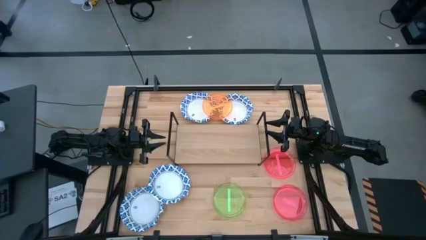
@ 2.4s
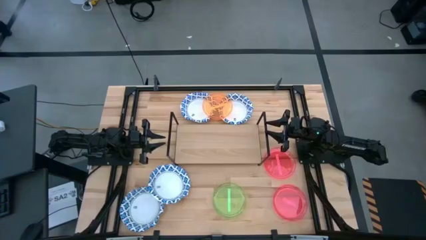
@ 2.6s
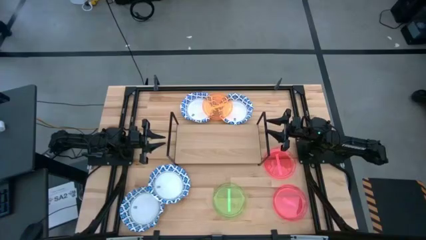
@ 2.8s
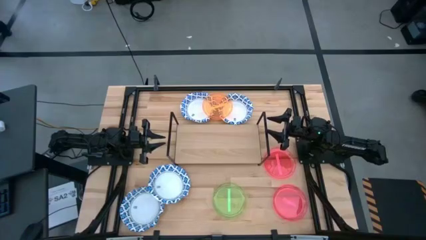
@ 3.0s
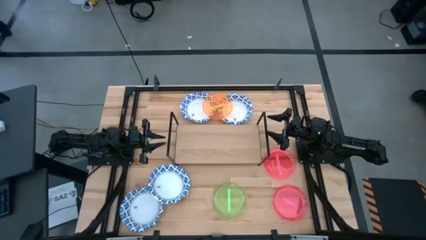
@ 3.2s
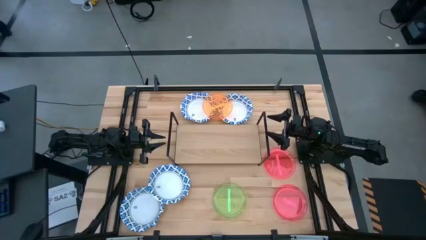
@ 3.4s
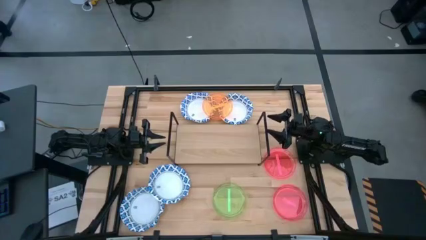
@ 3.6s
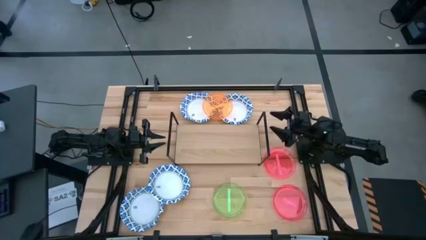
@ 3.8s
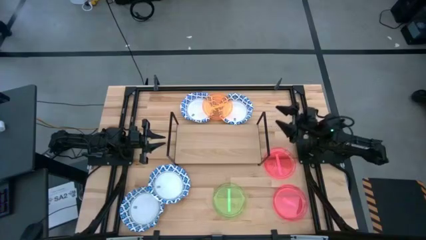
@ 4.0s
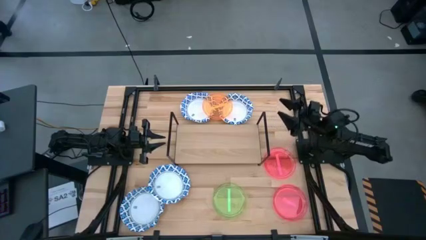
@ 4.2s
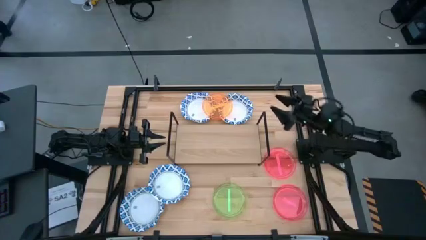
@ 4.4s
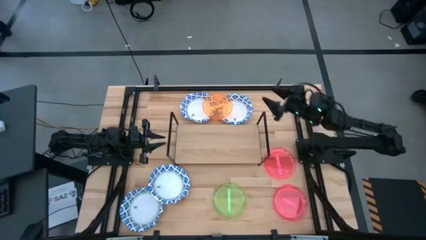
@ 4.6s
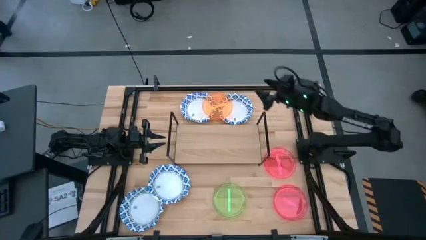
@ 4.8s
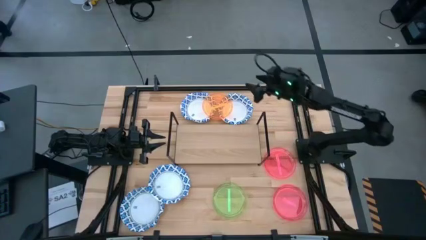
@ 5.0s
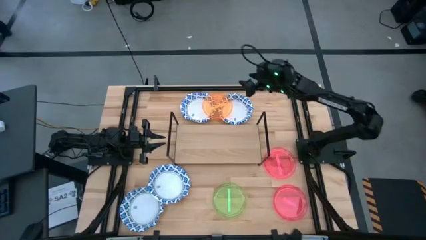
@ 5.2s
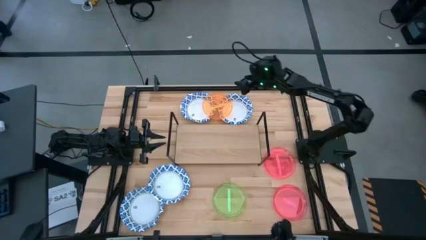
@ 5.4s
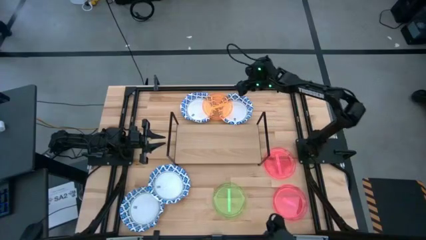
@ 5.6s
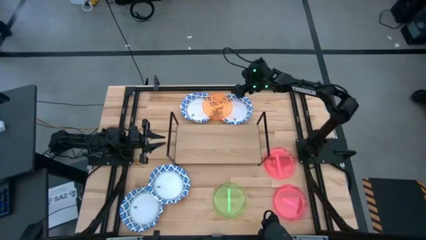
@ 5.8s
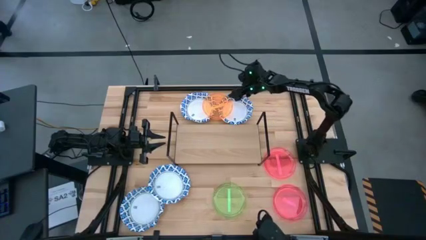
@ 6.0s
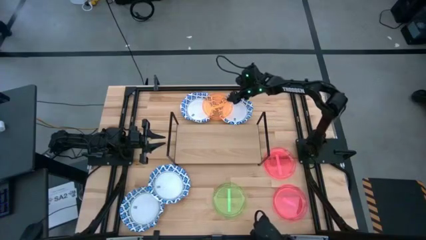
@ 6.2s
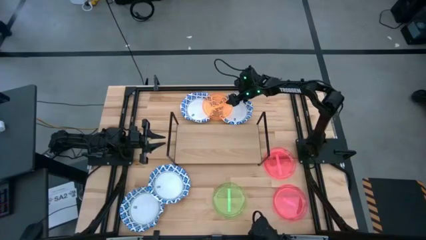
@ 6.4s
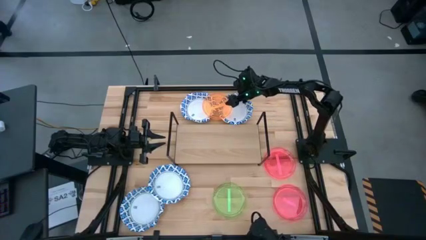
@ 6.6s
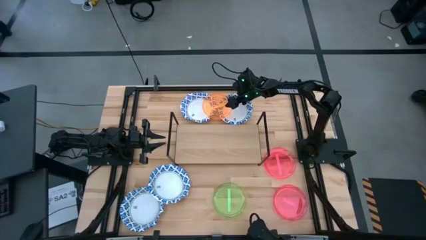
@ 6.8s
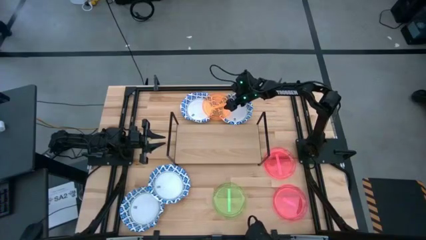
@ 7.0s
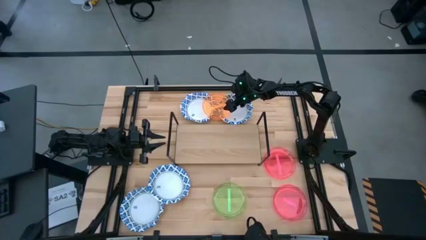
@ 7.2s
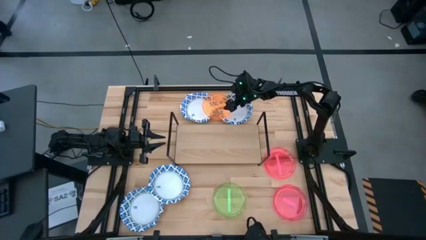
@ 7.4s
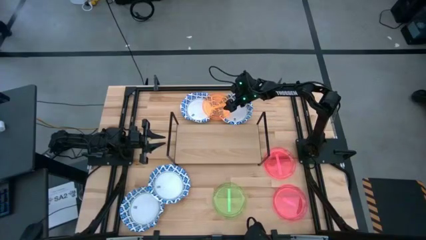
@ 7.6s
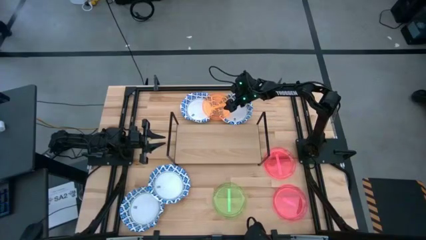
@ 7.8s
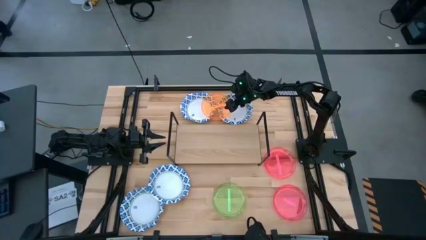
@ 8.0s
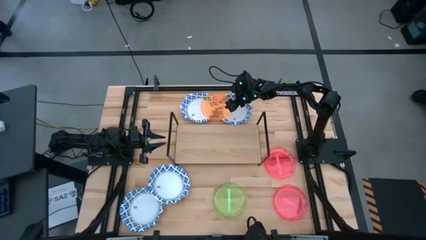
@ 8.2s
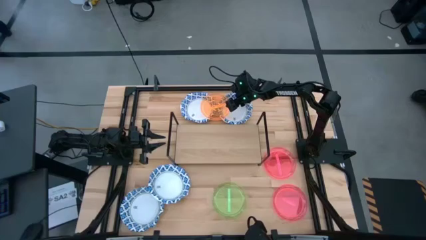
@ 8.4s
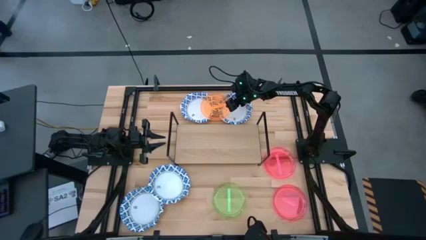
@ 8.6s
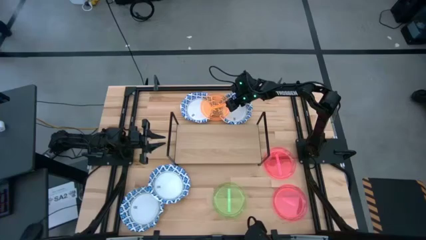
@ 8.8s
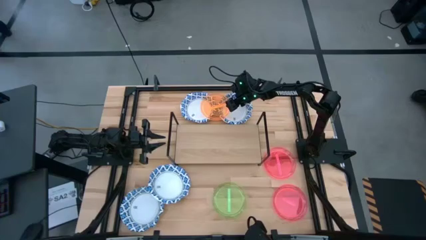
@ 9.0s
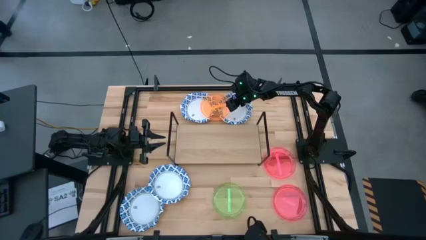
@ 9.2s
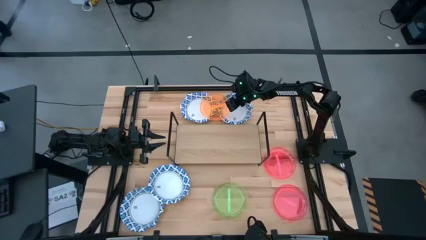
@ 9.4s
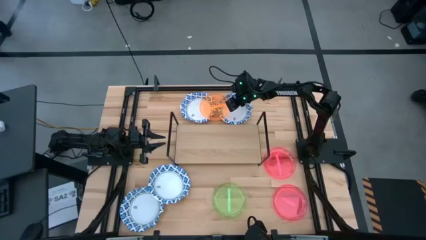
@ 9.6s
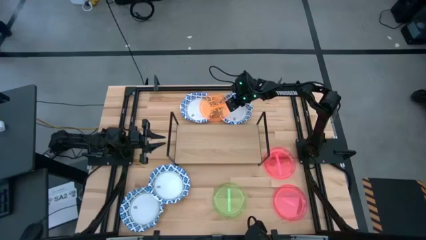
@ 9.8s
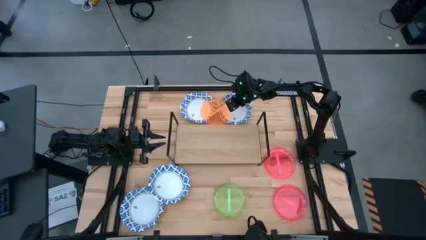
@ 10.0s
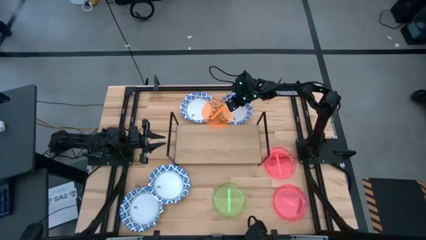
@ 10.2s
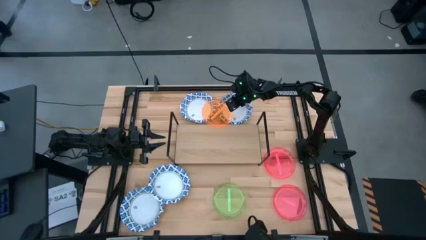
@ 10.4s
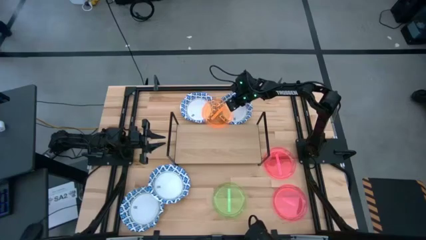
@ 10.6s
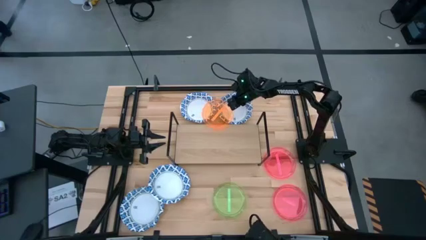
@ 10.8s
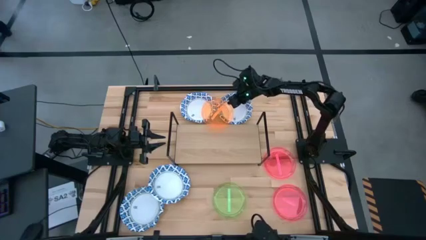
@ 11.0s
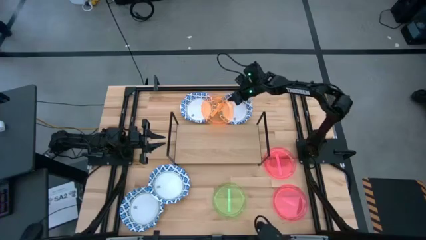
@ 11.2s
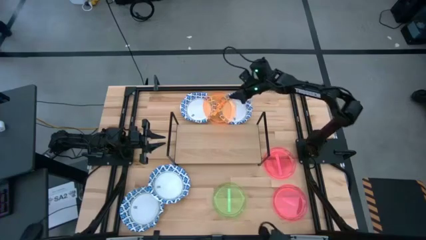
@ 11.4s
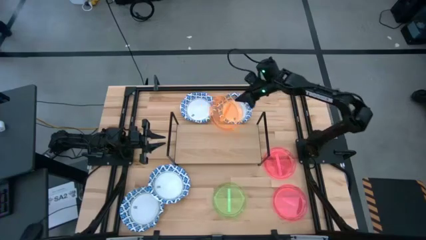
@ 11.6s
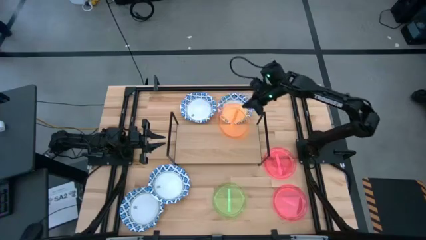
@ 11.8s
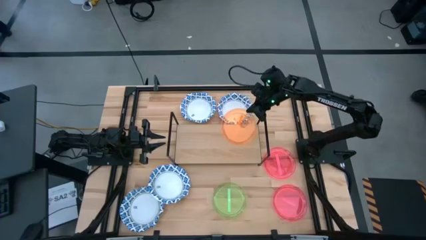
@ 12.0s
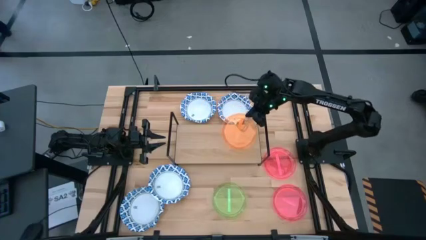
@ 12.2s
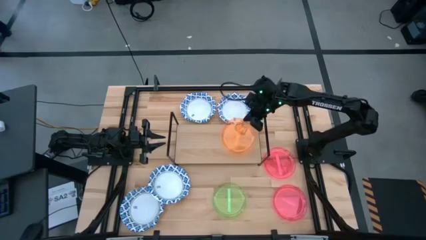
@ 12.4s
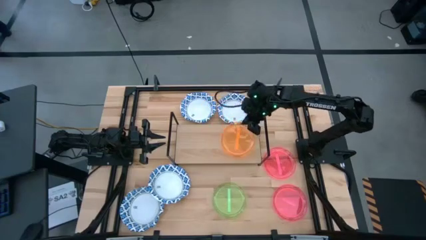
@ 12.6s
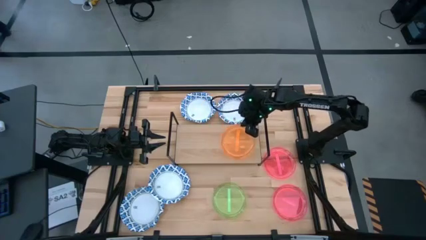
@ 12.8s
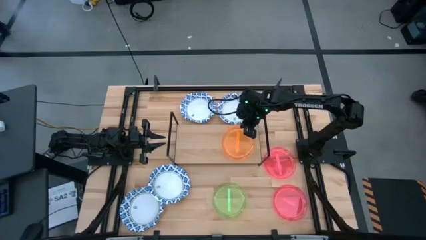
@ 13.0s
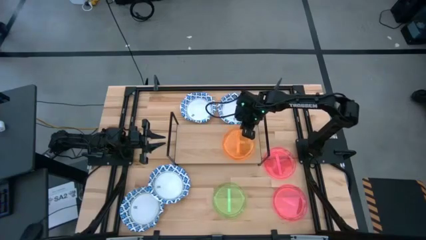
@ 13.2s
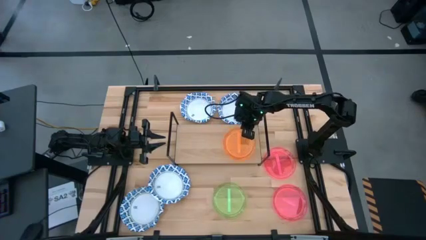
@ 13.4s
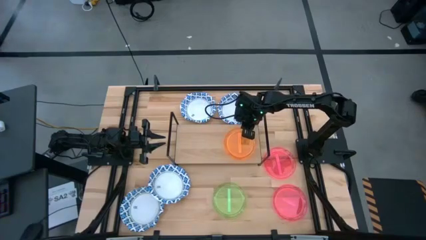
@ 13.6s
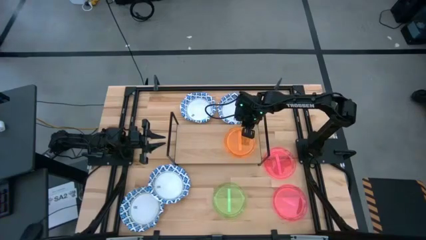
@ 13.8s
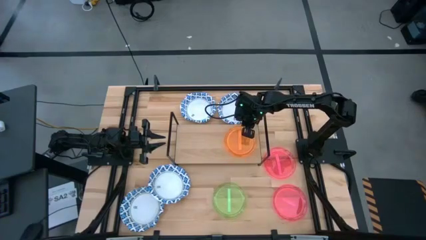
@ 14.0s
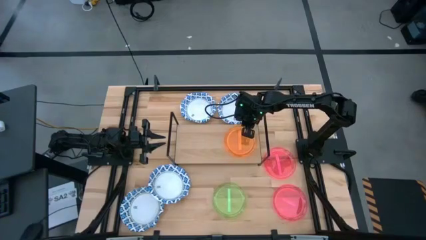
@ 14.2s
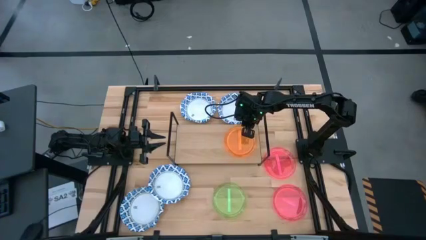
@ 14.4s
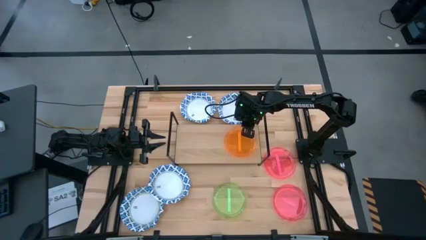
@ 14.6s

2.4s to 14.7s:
Task: Place and stack plates onto a shelf
Put the orange bowl on the shelf
